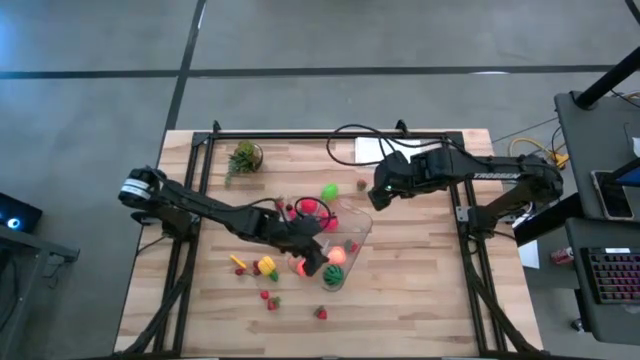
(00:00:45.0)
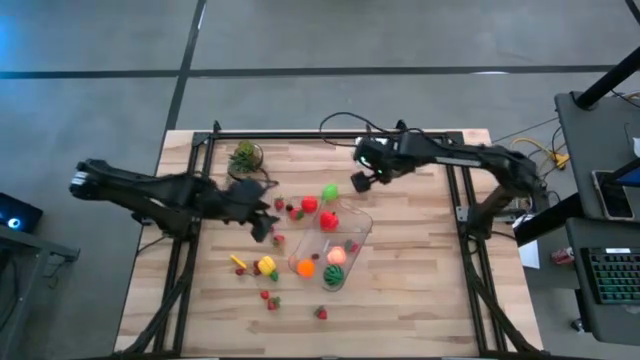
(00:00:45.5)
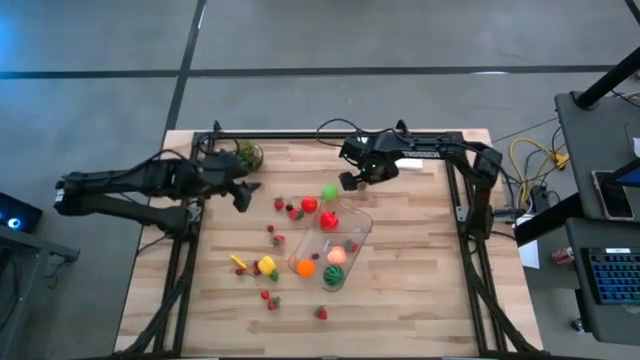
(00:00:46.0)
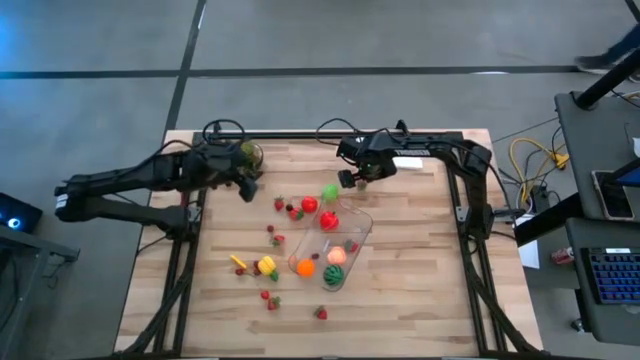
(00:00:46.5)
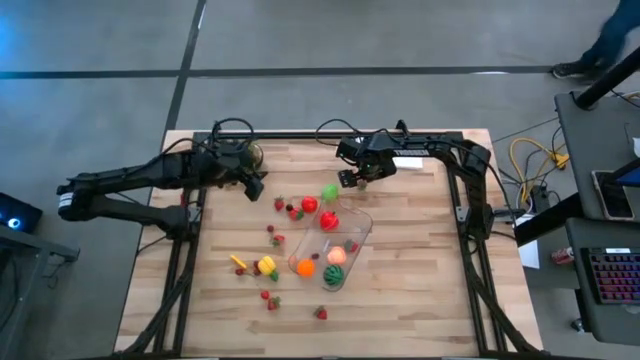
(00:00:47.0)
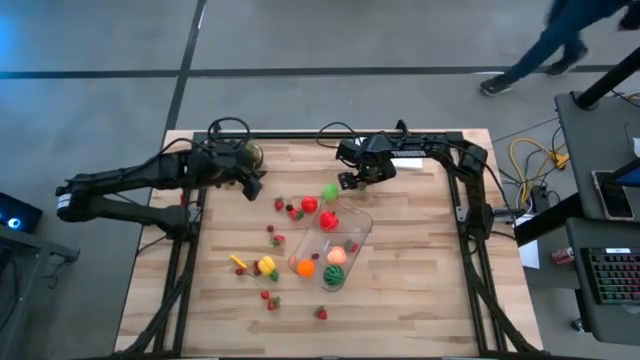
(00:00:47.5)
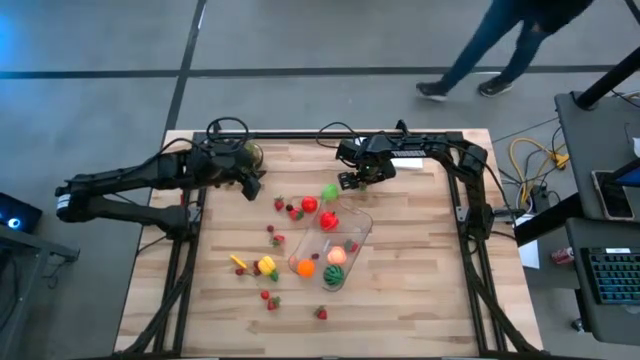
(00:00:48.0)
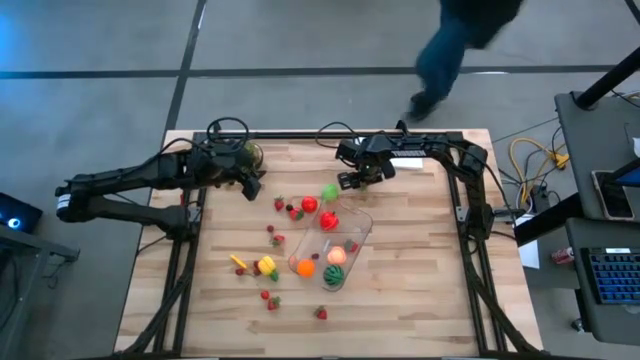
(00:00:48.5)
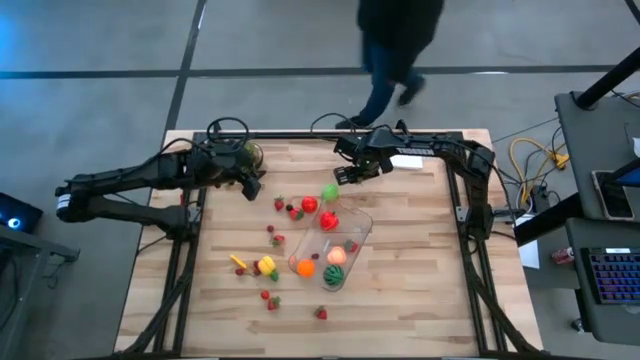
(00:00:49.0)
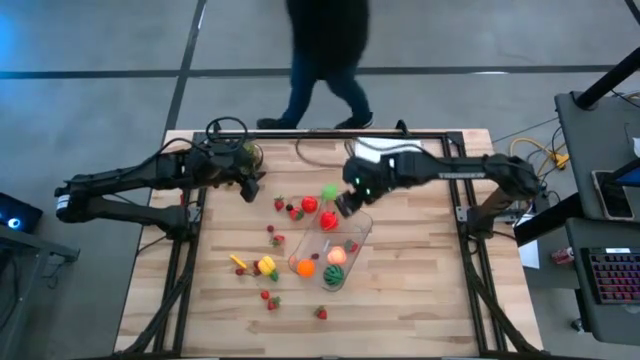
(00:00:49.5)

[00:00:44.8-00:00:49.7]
Task: Pick and placing Produce into tupperware
Put the red strawberry into the transparent bin

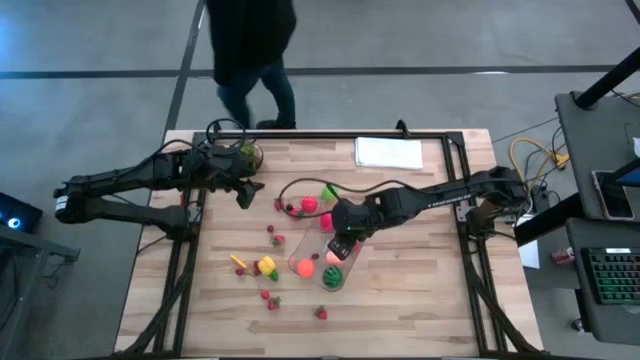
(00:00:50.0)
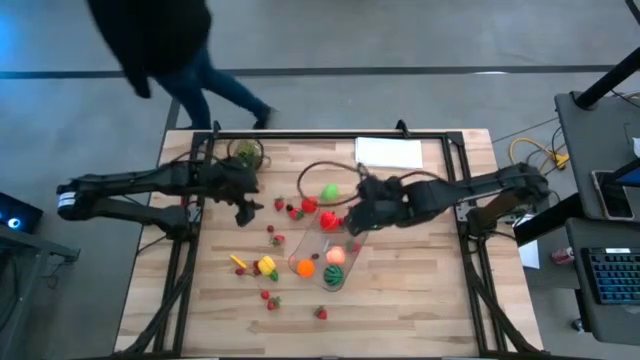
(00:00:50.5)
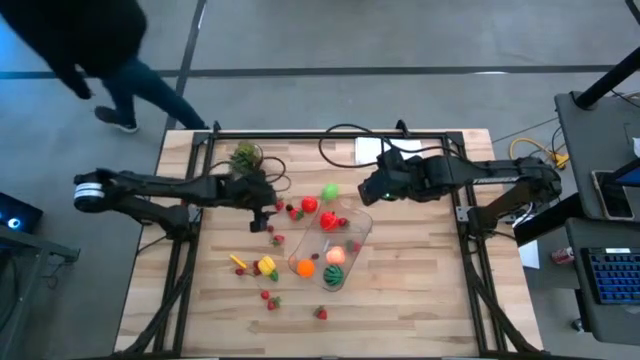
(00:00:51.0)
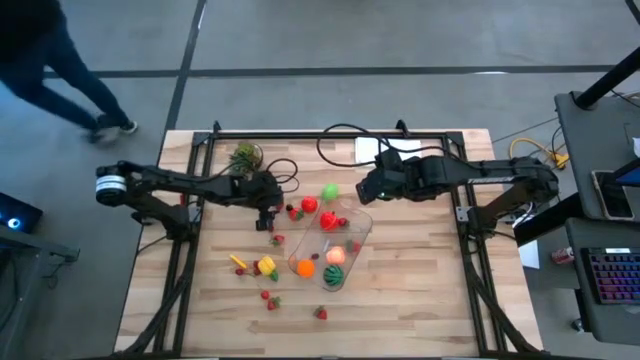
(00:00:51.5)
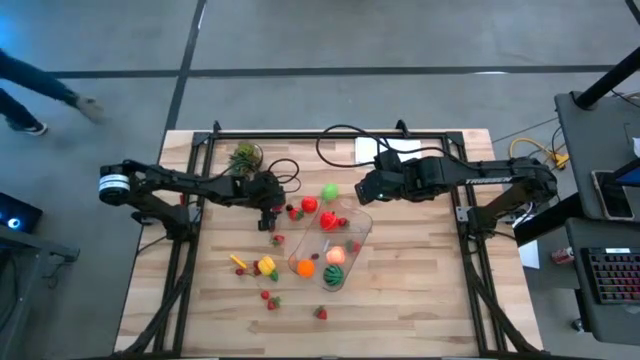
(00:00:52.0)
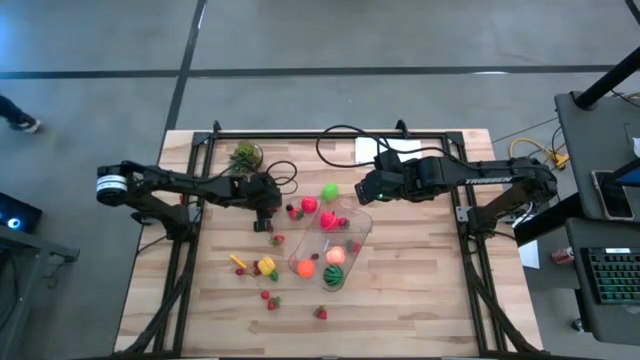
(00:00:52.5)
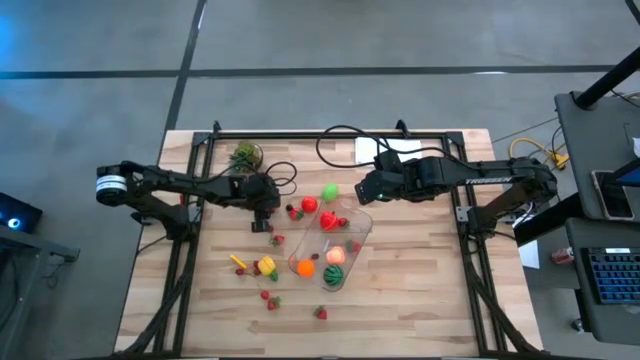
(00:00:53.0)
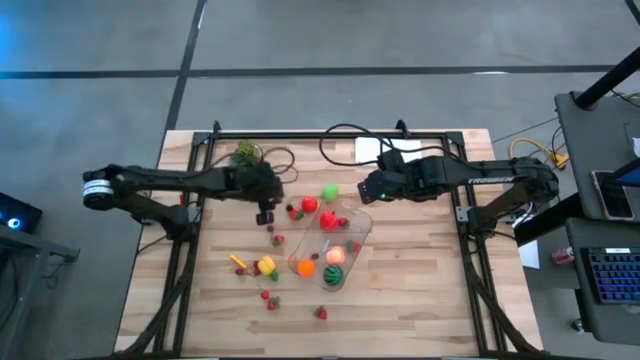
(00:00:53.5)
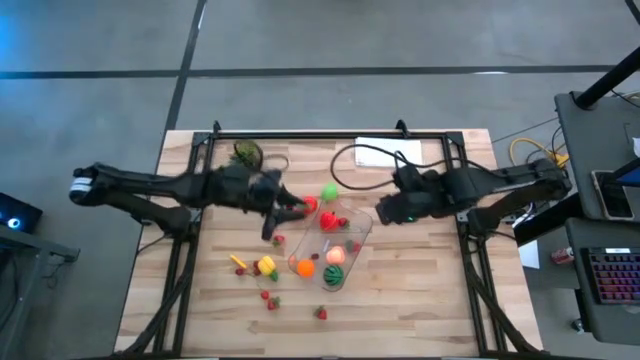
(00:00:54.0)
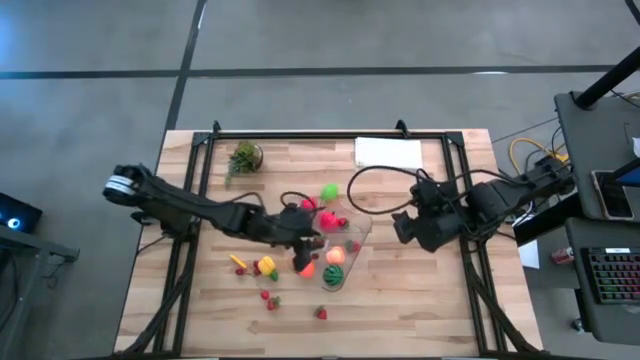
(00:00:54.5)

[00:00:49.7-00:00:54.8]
Put the red strawberry into the transparent bin

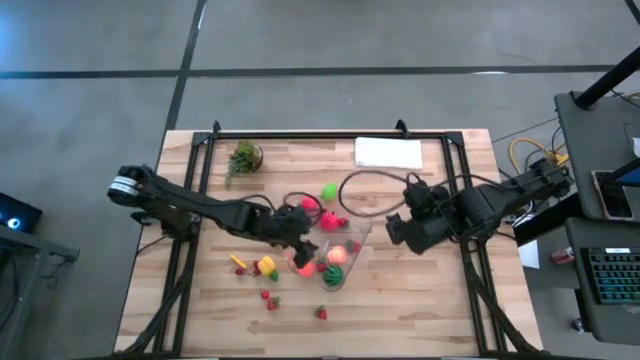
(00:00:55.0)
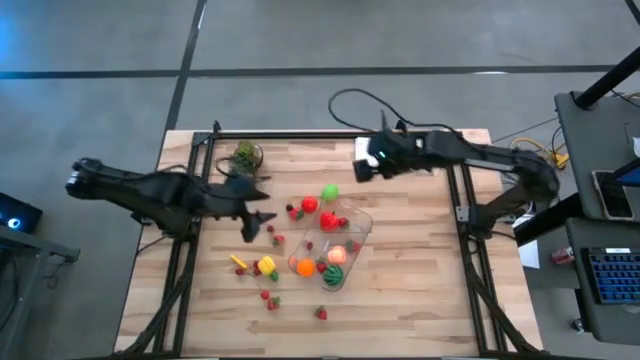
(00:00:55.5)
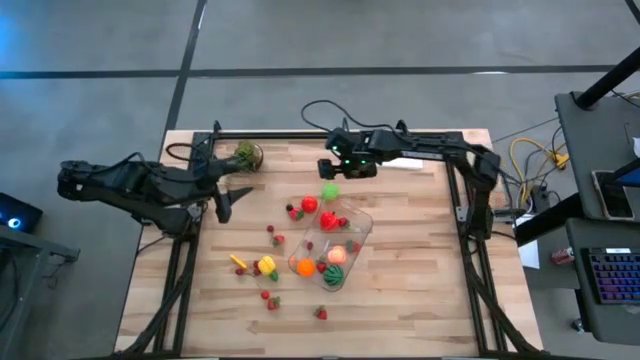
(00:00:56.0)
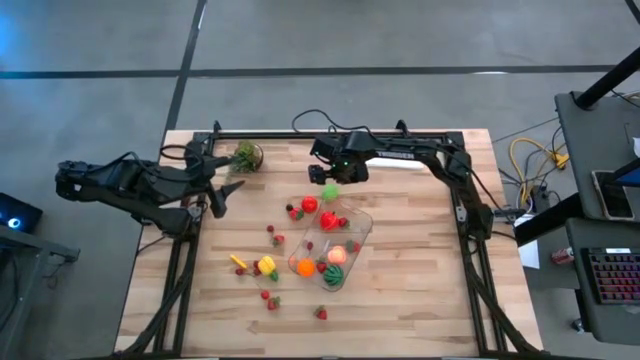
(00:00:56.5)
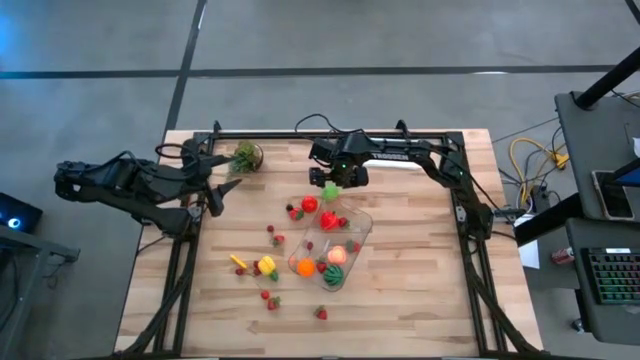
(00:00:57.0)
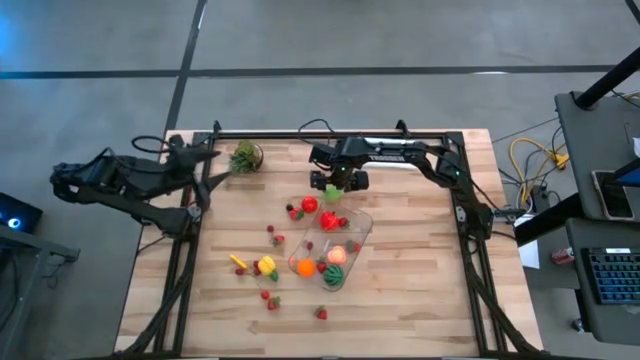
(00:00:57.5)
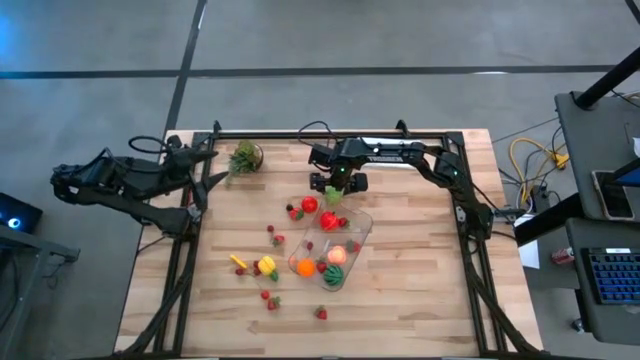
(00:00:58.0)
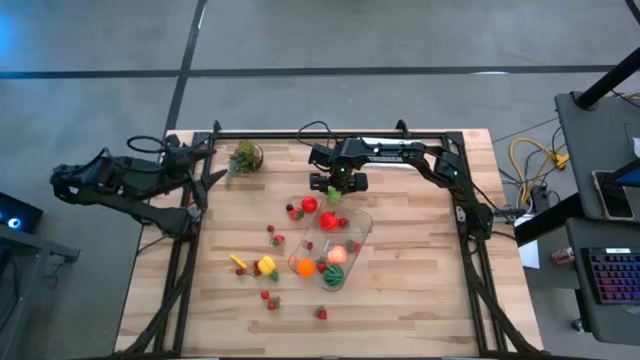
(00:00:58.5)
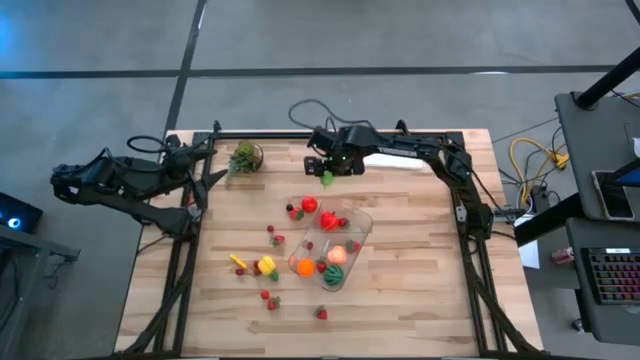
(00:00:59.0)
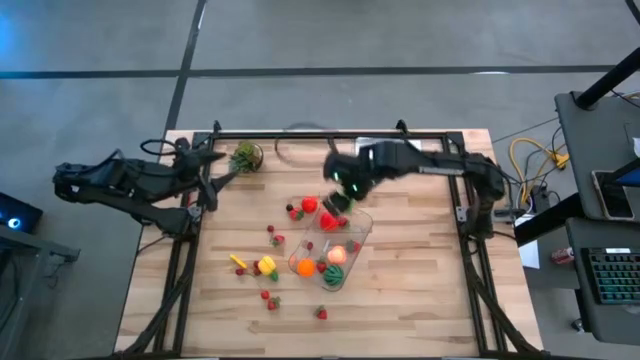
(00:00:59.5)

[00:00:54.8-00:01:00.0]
Put the green cabbage into the transparent bin

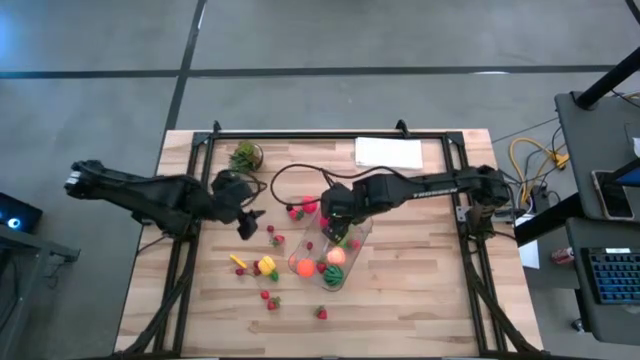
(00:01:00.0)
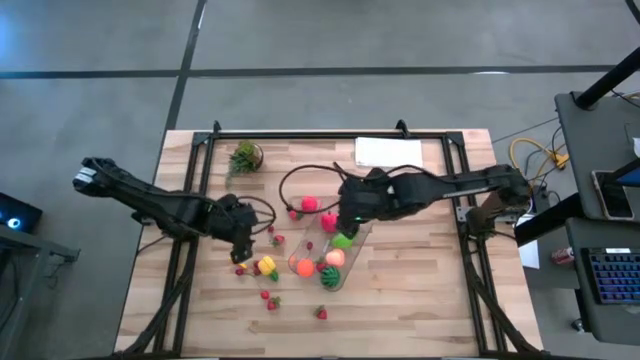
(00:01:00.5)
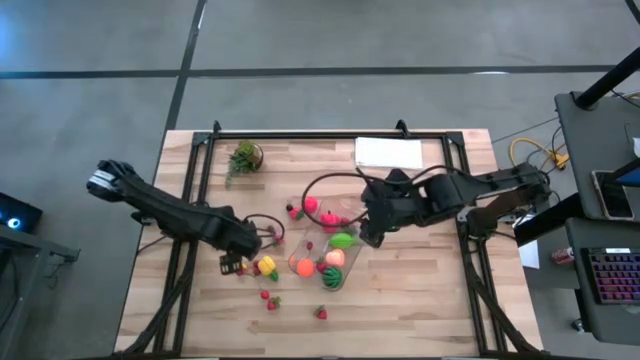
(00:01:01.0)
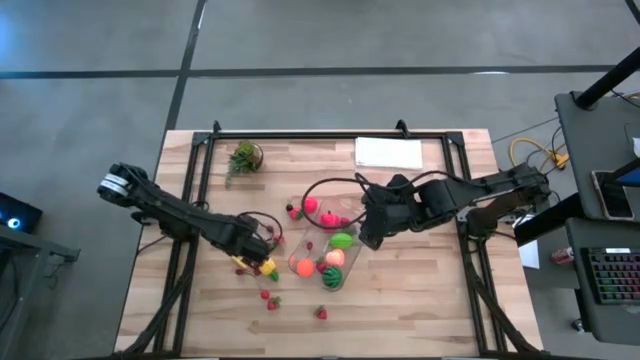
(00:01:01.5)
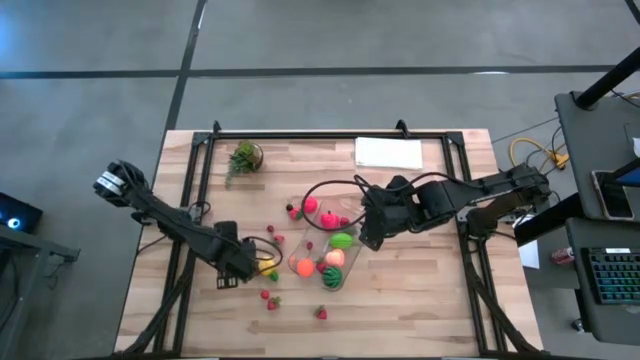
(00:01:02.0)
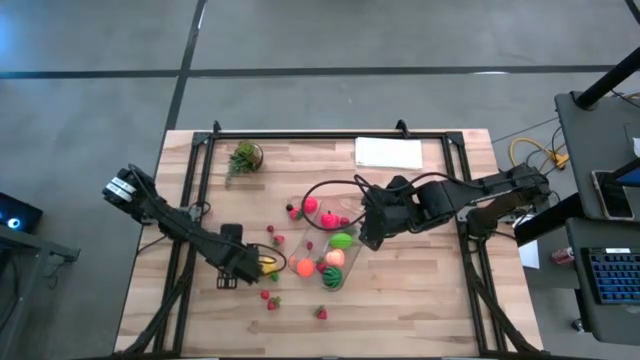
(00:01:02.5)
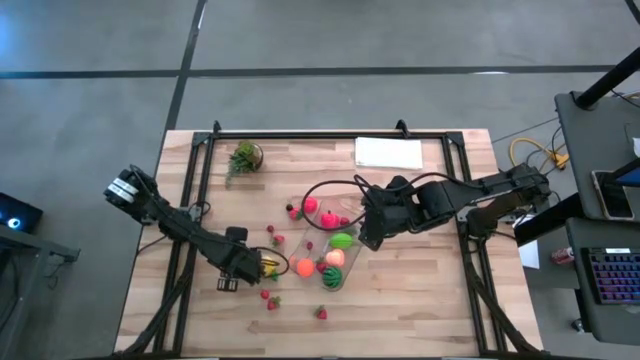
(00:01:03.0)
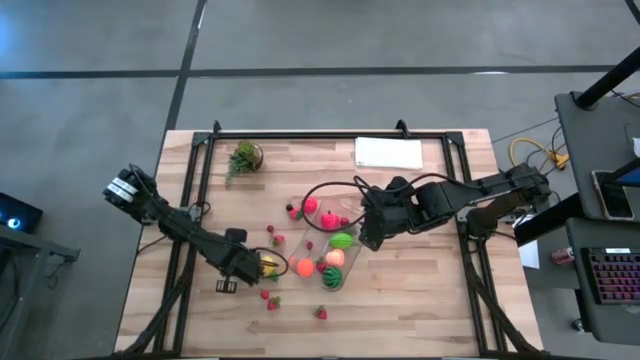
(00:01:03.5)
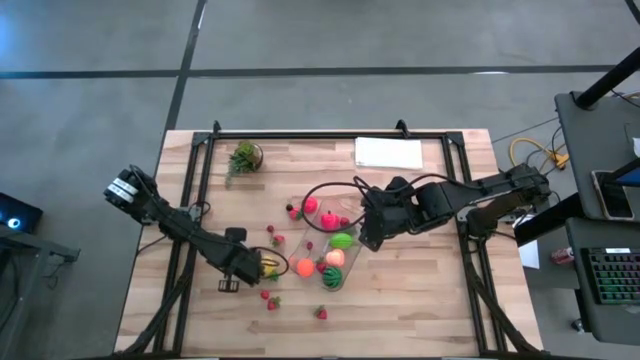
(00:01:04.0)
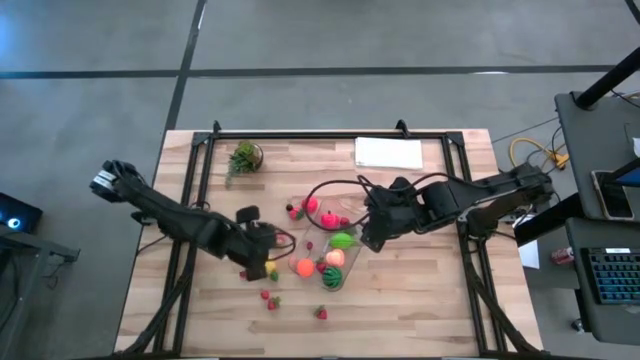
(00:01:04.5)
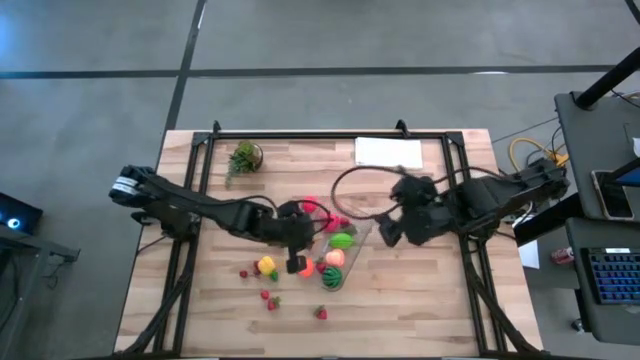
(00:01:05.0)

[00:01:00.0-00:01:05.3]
Put the yellow corn into the transparent bin
